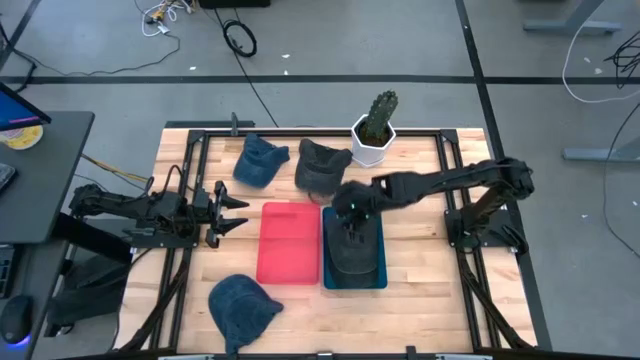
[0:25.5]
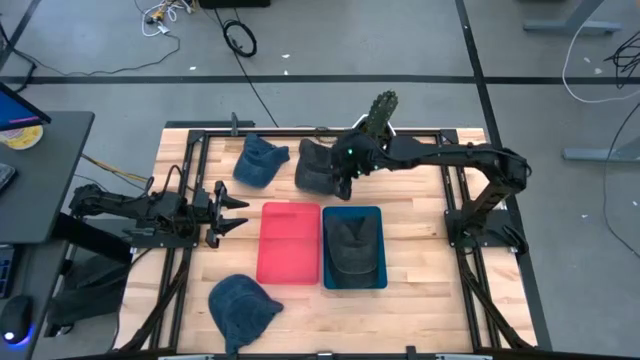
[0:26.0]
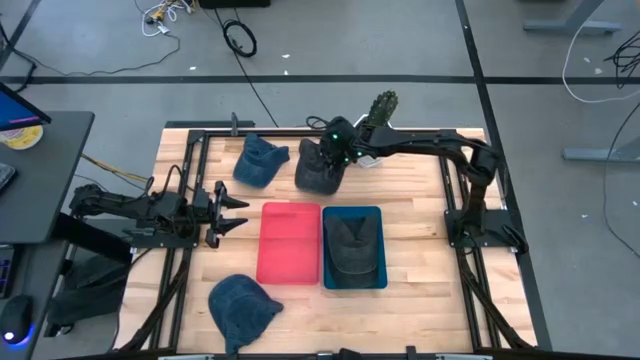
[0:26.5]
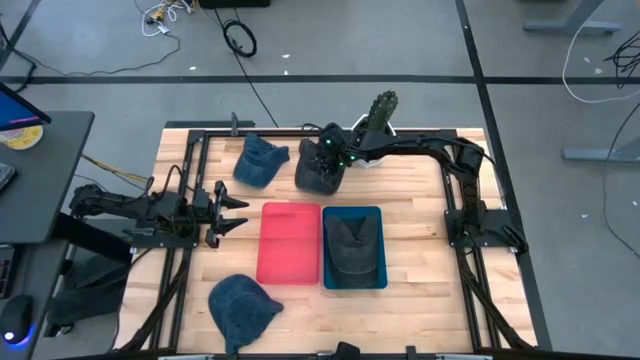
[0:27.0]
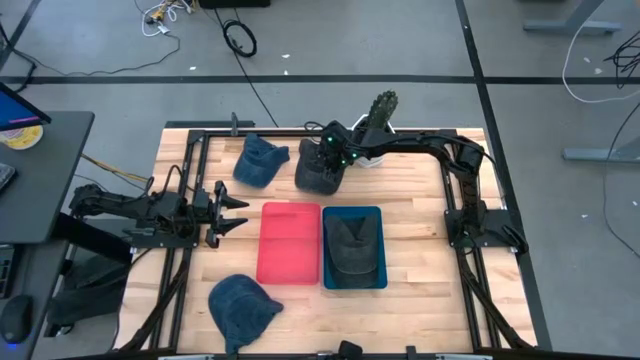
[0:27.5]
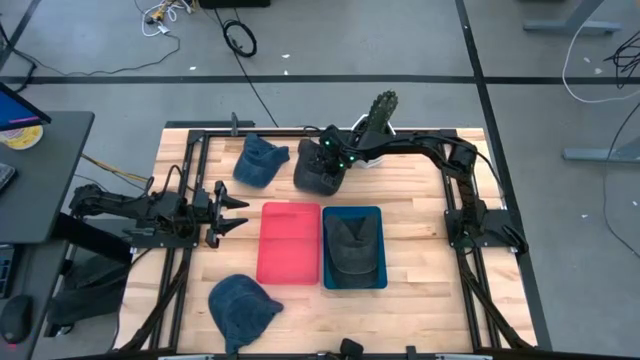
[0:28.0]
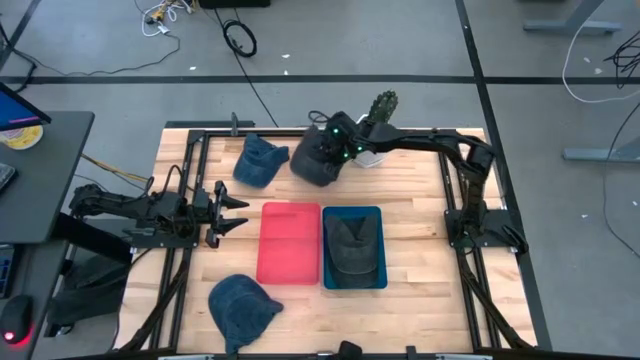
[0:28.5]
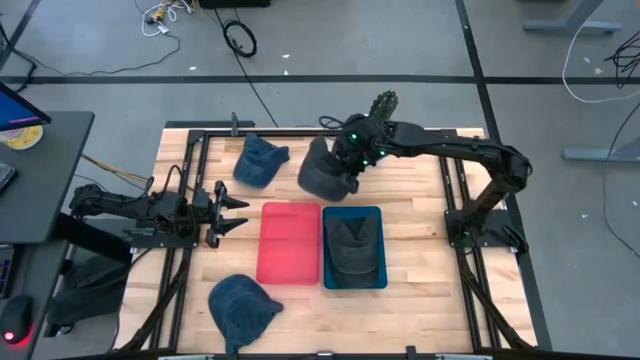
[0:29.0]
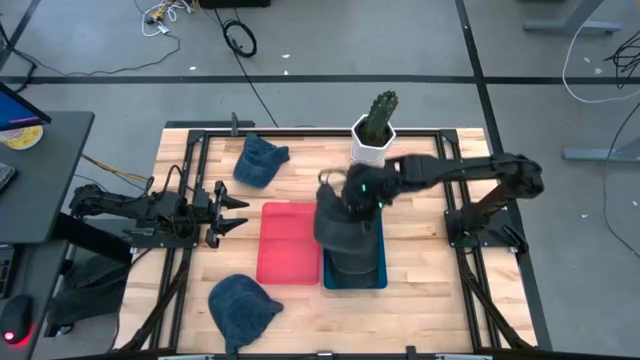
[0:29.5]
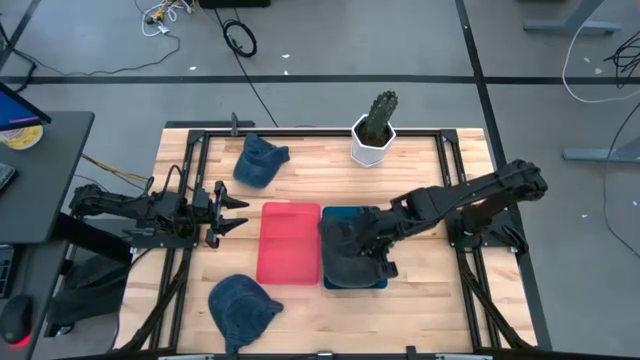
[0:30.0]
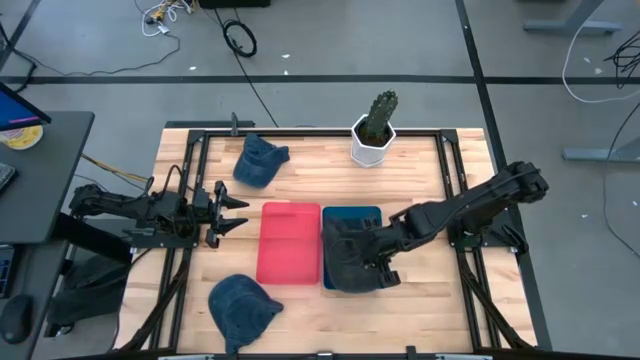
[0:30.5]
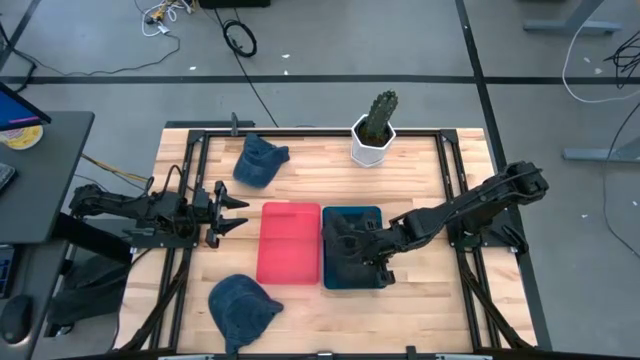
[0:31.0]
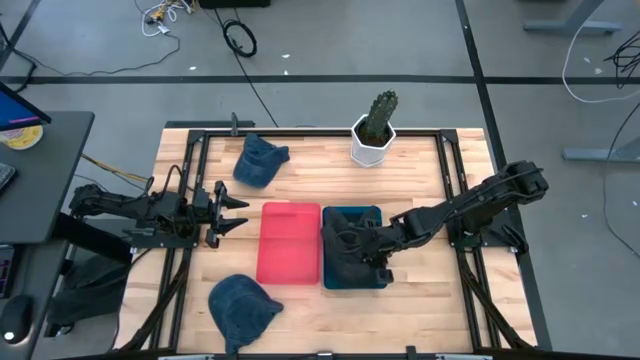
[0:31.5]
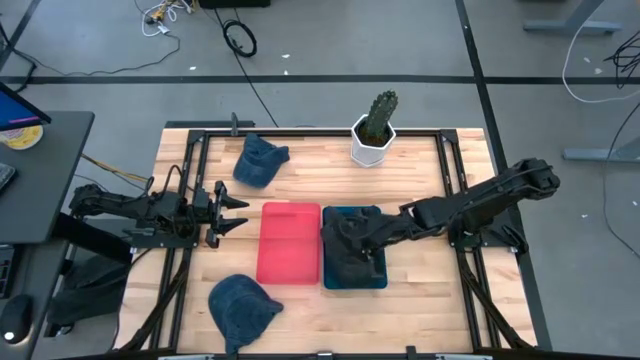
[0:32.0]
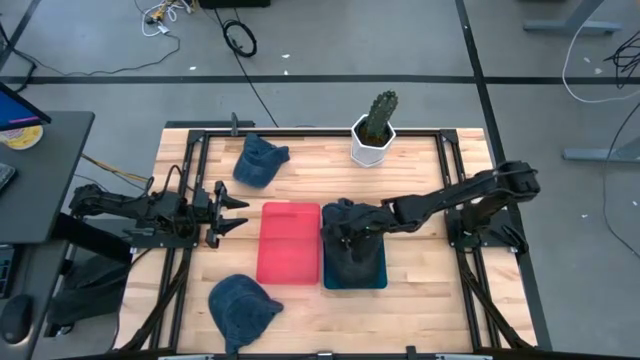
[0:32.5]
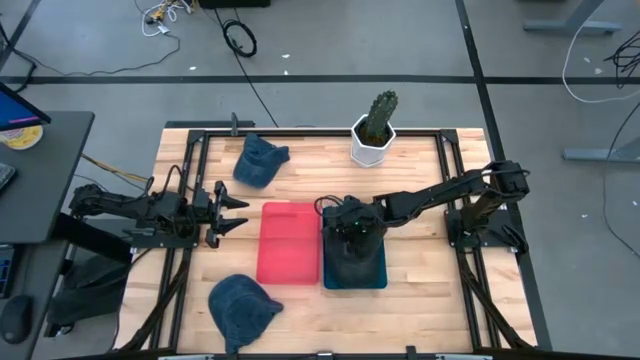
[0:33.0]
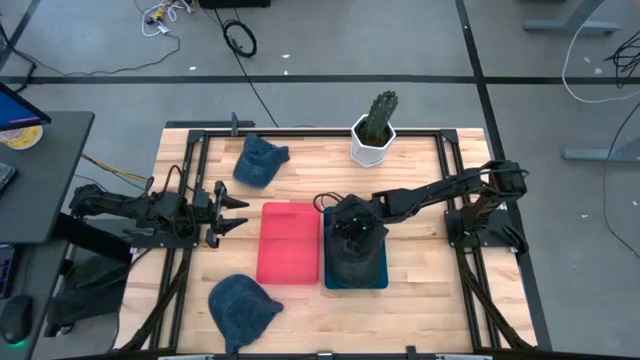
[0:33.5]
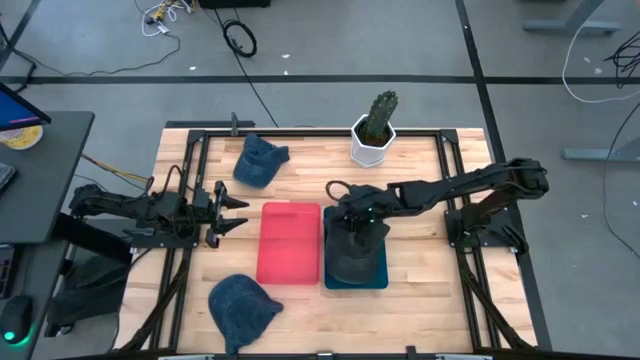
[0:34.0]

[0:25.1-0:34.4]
Task: Pick & Place hat
Put the black cap into the blue bin

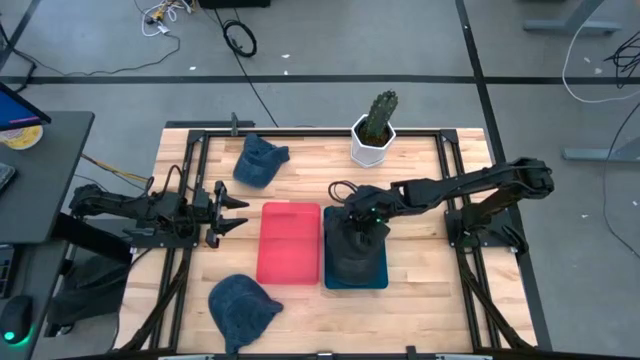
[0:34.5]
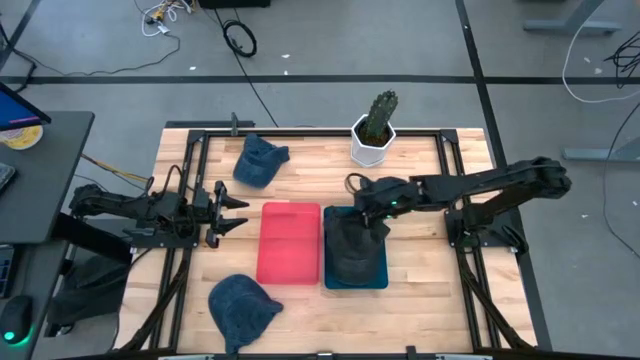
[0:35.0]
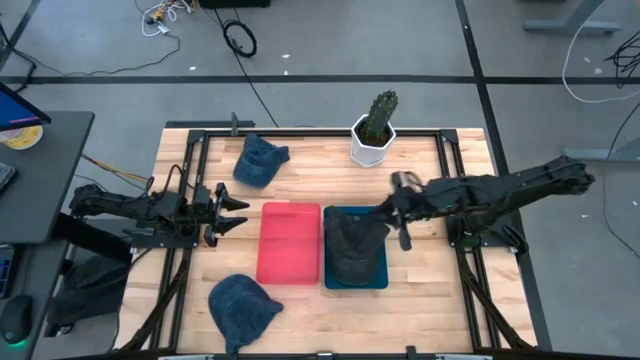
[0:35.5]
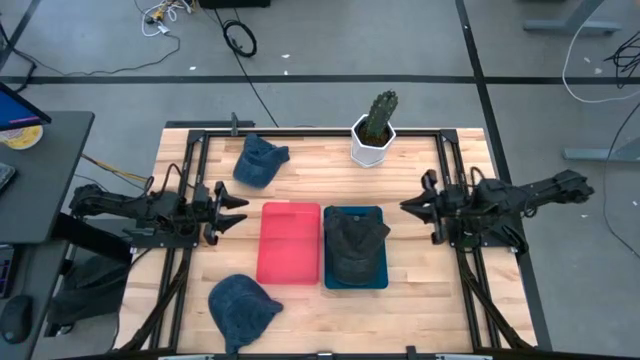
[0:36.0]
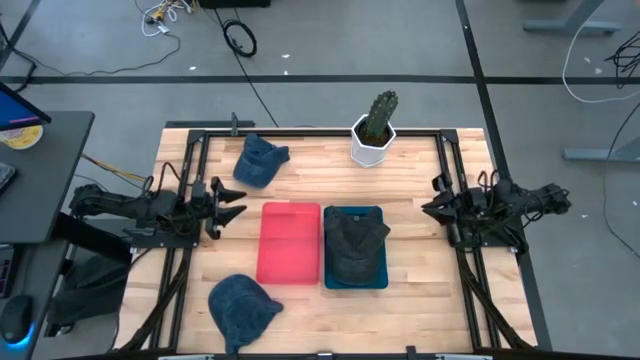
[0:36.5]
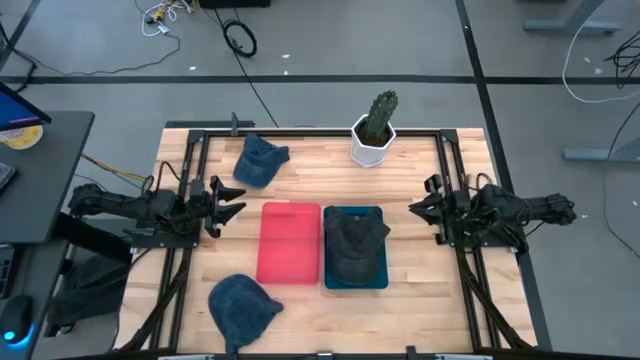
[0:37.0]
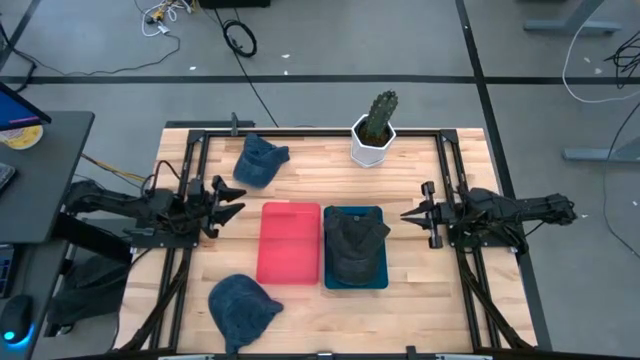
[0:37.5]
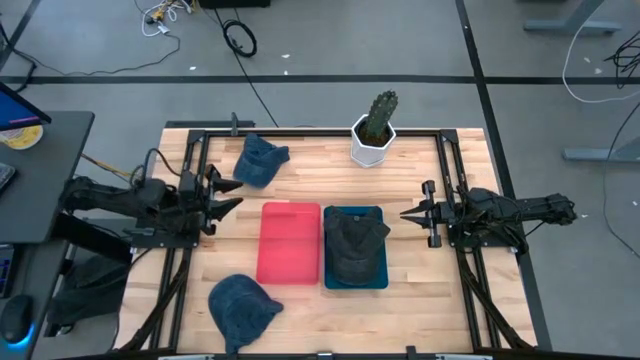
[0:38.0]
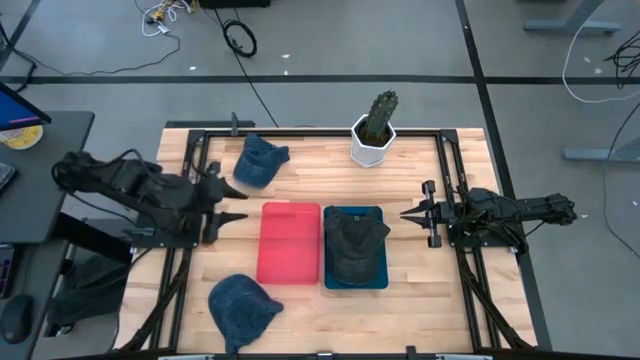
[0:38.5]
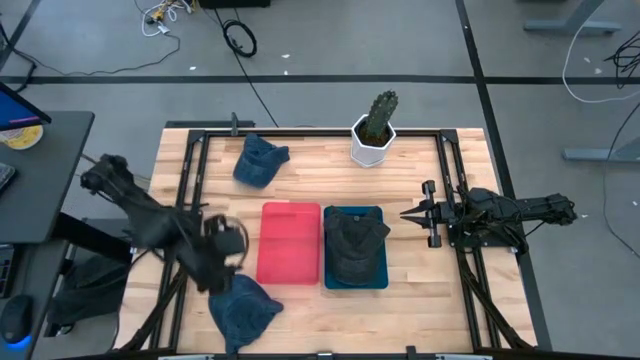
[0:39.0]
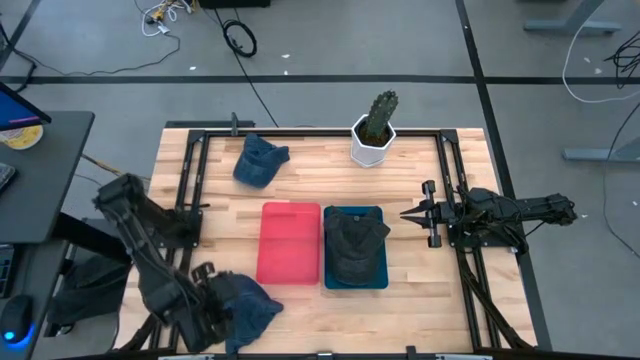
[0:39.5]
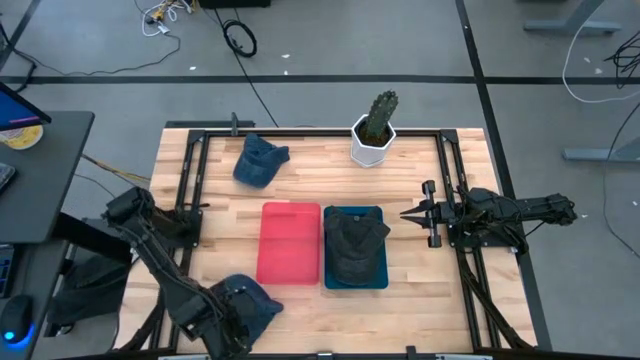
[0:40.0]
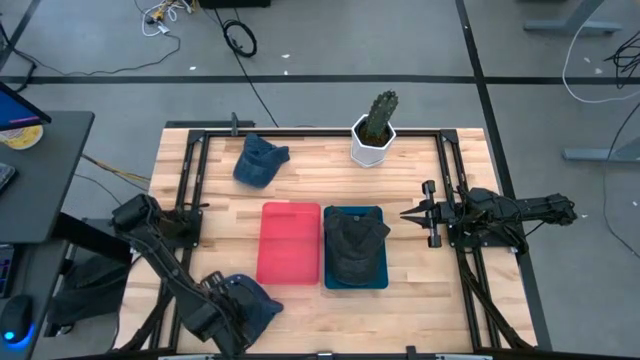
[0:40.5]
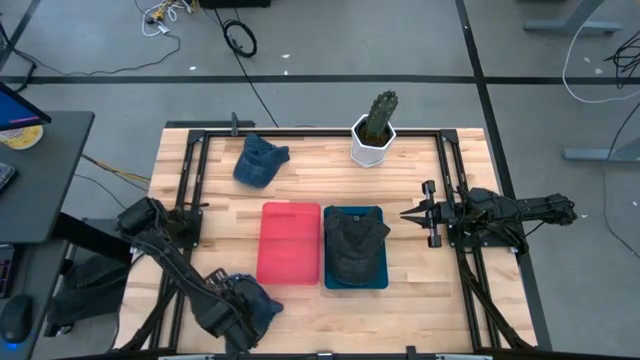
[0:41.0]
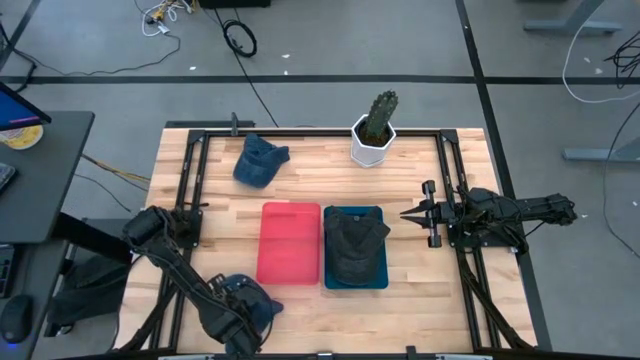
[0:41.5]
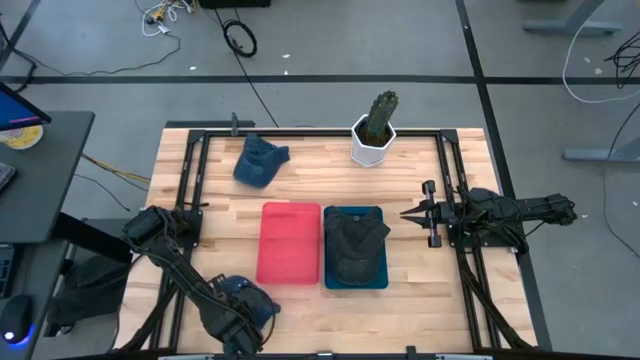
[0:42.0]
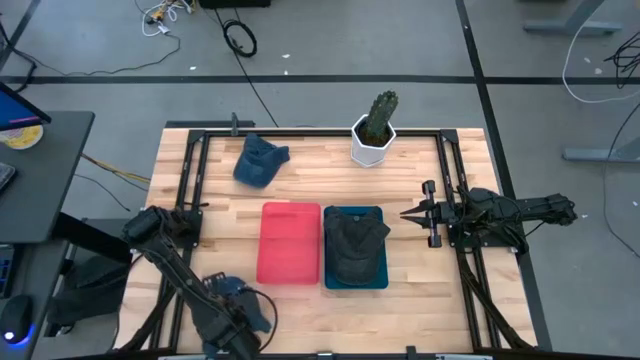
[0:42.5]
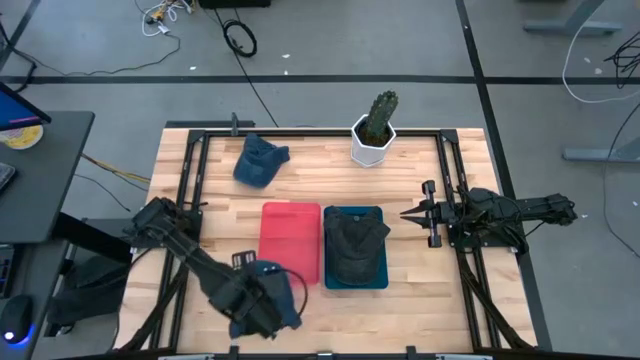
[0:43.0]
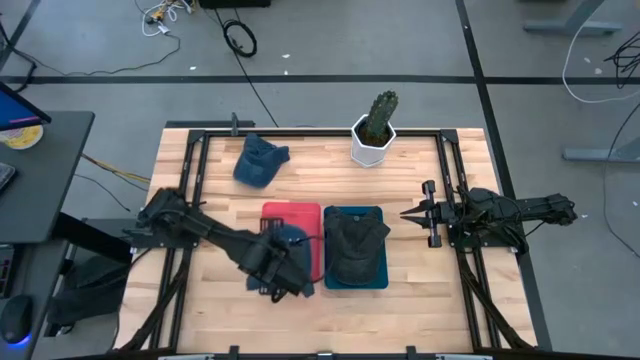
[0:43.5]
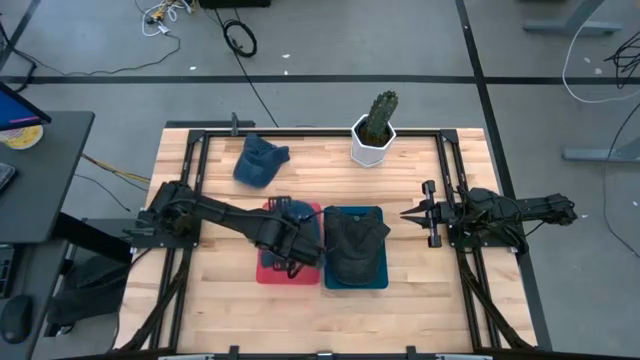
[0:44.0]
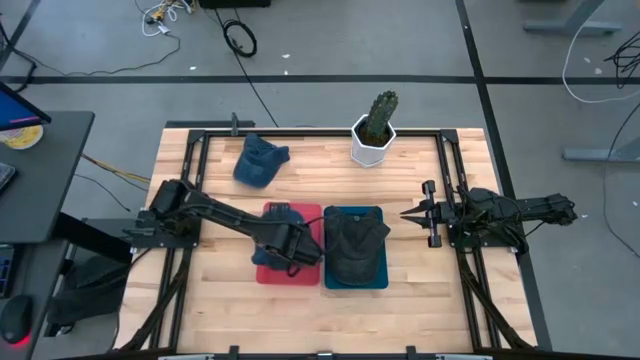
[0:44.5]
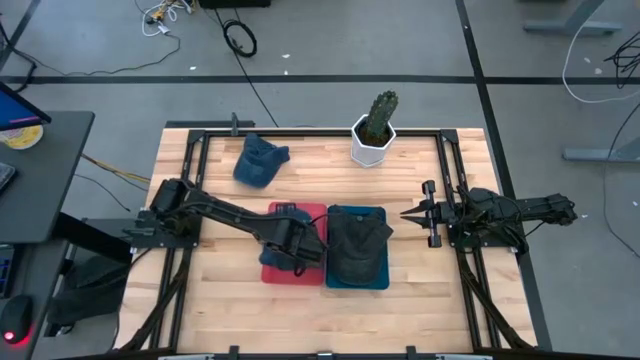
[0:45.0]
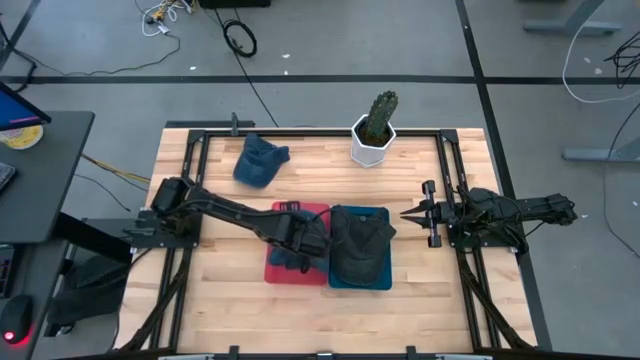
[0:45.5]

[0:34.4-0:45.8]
Put the bottom blue cap into the red bin
